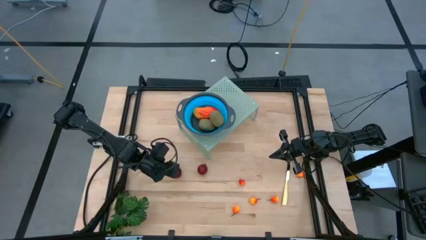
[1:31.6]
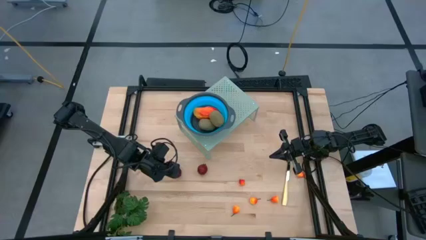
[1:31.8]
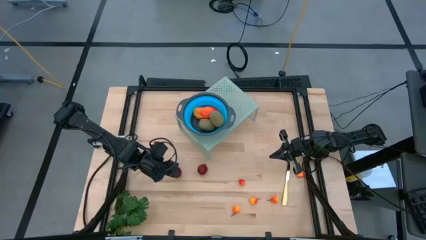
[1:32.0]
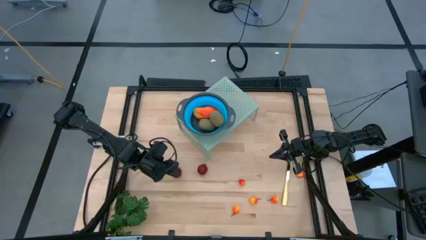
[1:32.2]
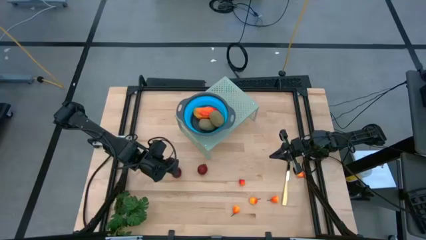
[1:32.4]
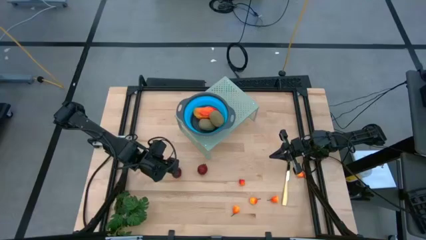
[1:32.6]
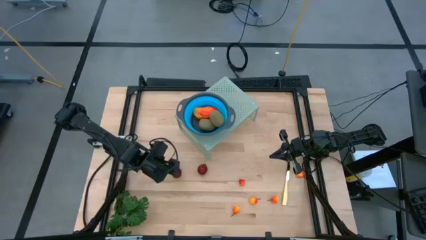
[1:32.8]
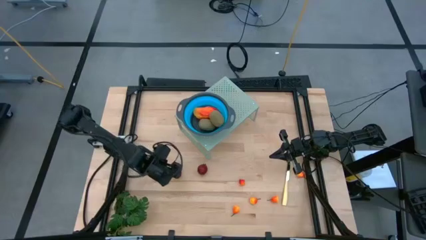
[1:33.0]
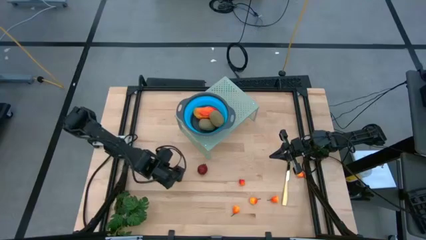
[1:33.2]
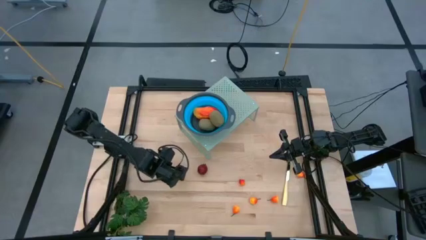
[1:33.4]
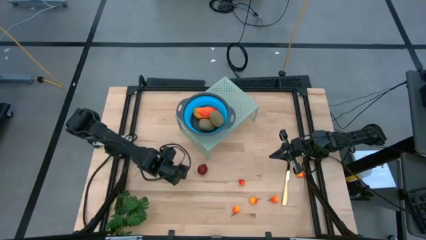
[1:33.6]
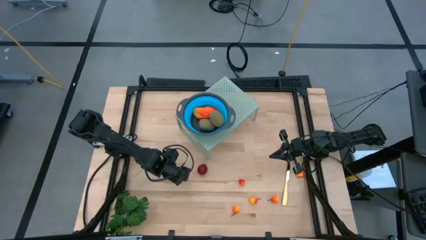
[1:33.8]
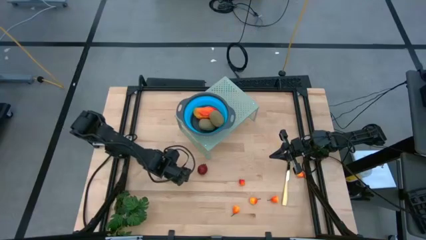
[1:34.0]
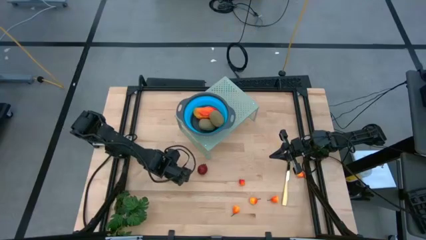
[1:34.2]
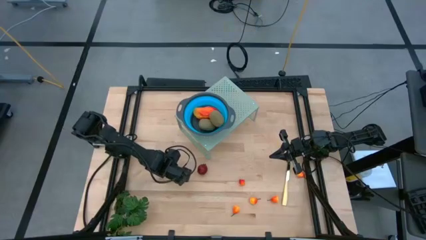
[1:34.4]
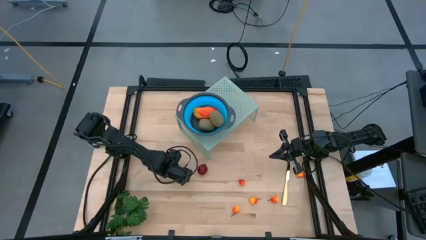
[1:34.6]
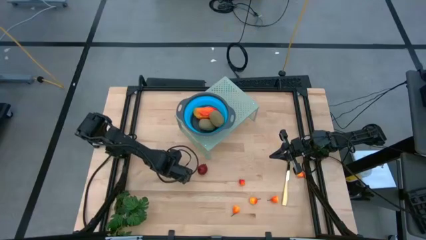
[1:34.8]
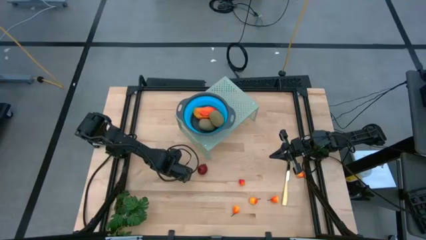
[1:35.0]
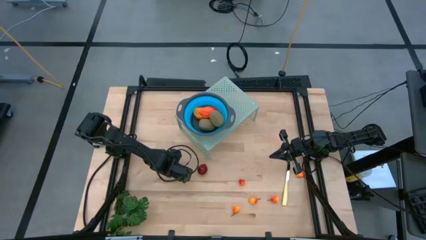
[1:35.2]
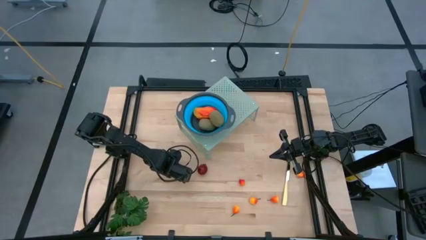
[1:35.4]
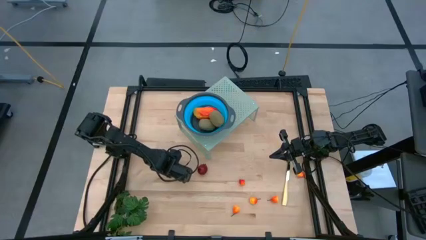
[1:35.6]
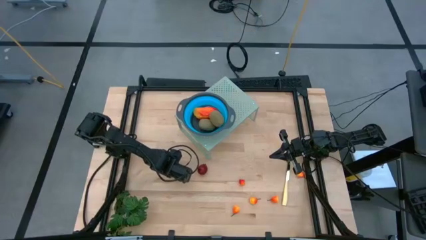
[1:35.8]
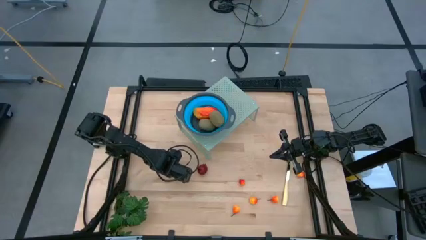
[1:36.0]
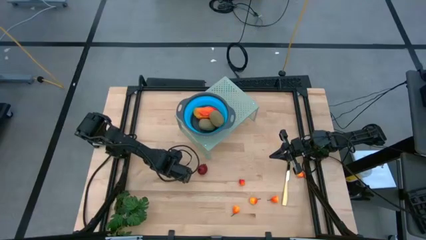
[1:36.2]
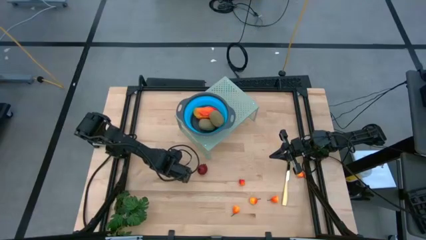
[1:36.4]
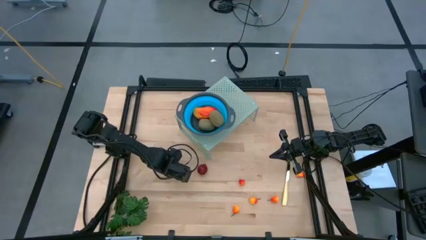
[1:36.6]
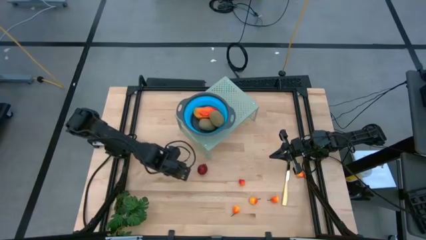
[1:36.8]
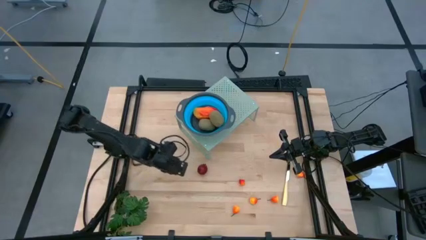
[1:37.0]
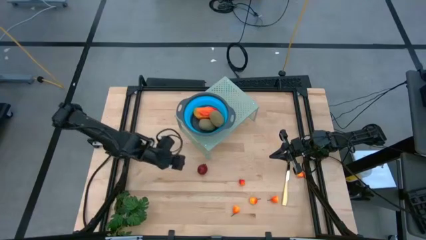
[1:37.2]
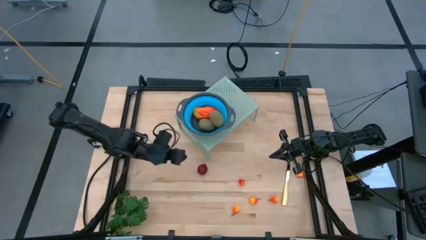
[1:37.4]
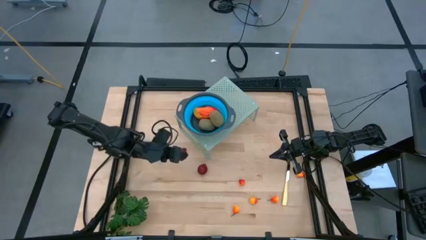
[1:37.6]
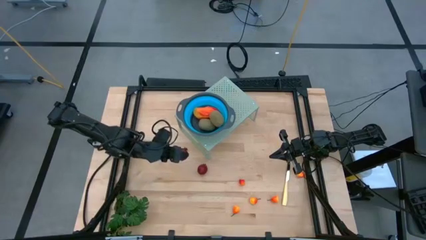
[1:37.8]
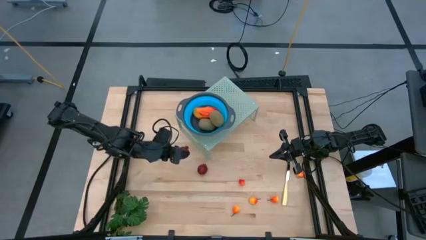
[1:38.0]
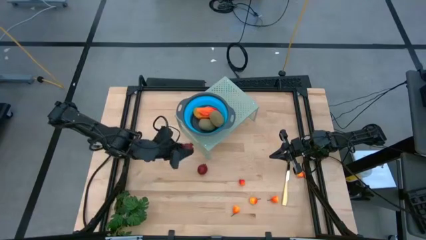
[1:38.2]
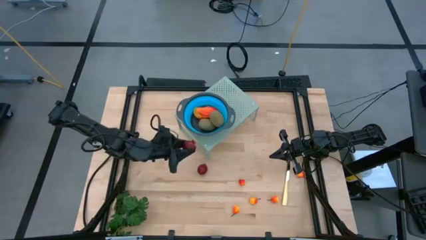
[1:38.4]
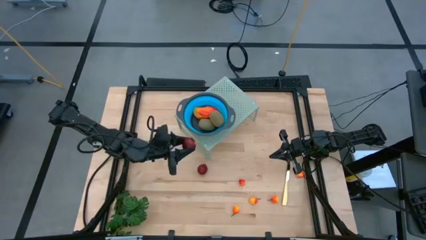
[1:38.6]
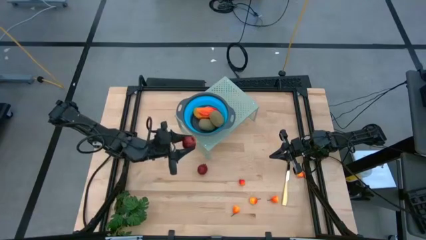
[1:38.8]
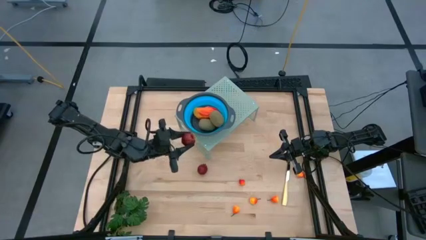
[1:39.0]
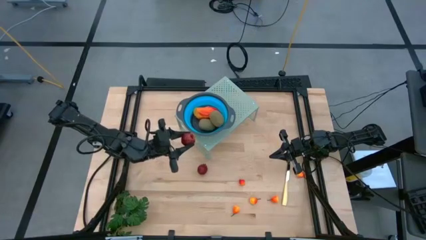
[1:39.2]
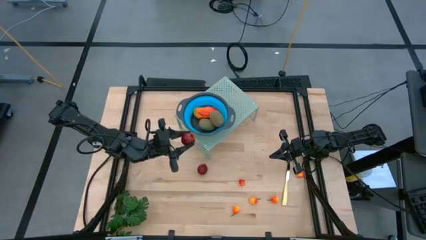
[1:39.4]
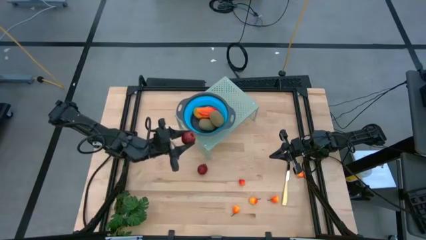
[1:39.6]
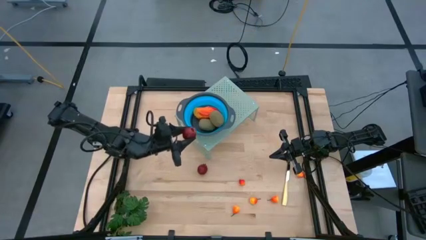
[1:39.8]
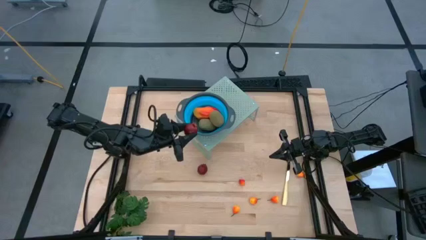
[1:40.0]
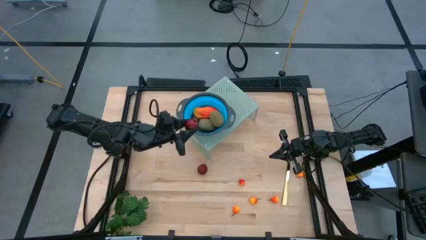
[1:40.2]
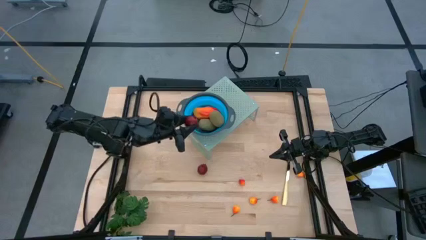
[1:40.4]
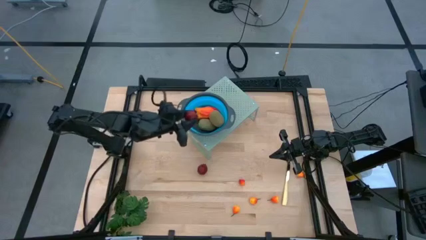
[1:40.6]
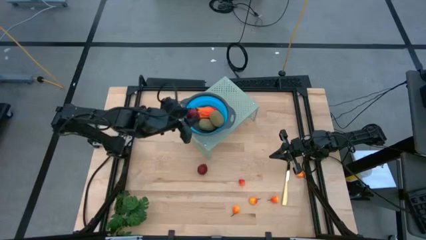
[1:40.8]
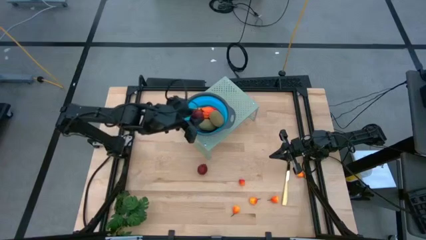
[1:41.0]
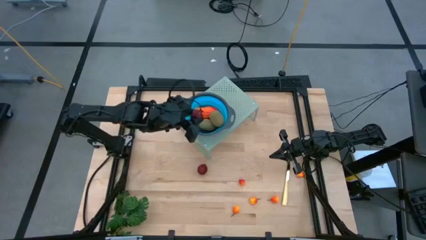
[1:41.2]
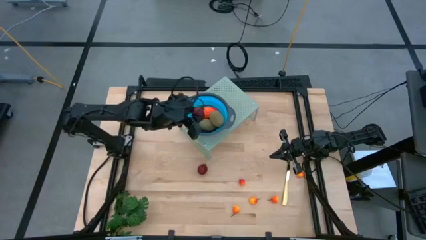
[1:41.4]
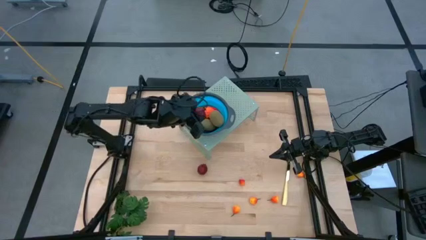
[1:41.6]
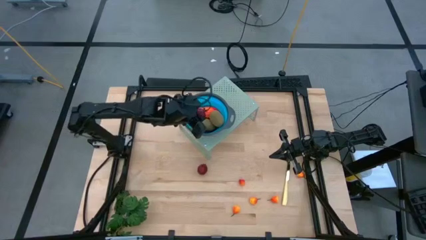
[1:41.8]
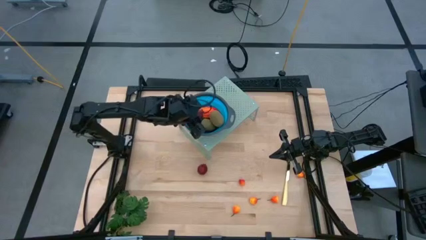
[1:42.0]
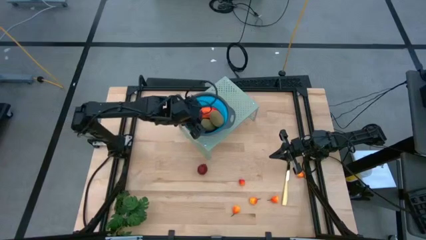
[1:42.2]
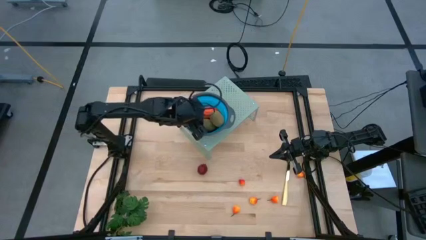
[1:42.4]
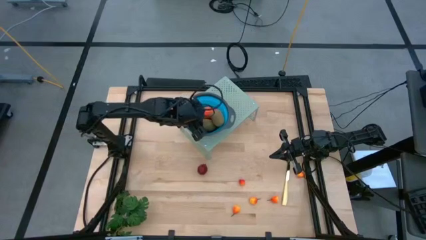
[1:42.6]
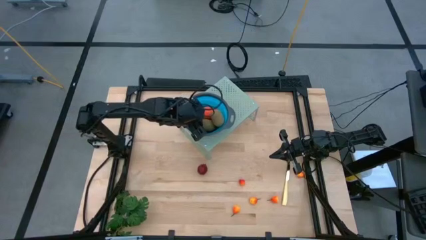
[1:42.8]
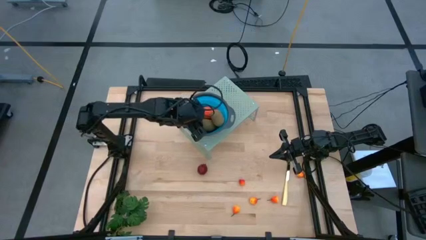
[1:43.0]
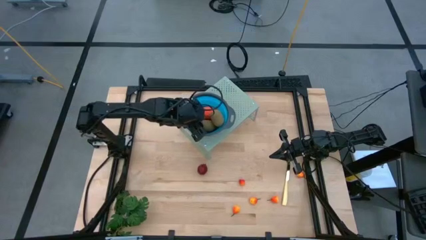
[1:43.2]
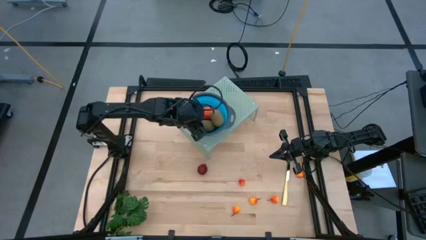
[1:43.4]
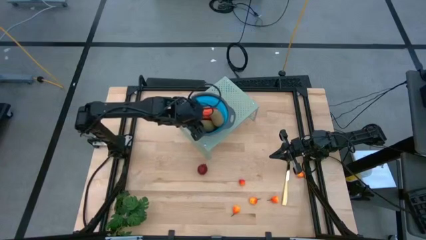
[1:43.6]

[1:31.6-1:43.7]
Task: Pick & Place Fruit
Put the pomegranate into the collapsible colander on the shelf
